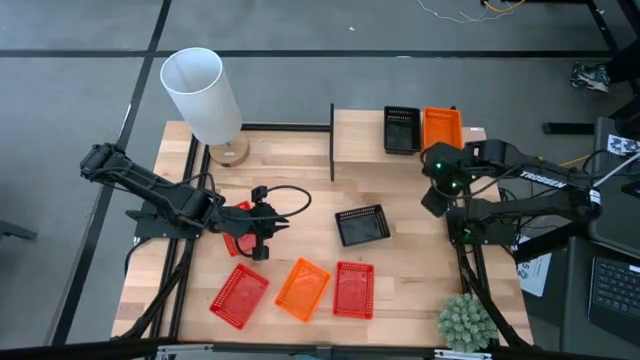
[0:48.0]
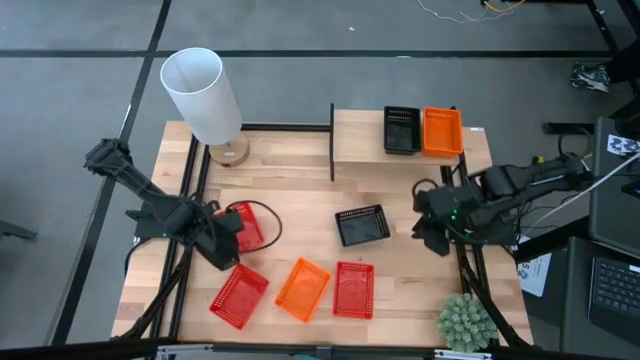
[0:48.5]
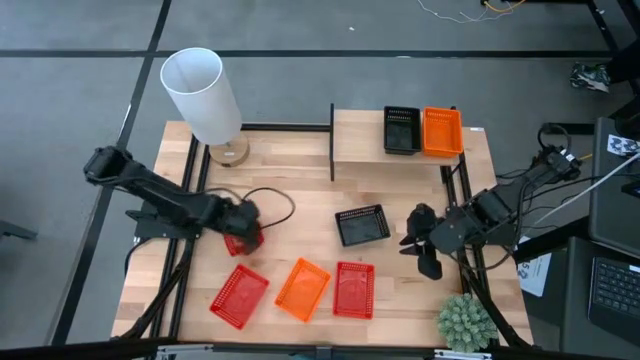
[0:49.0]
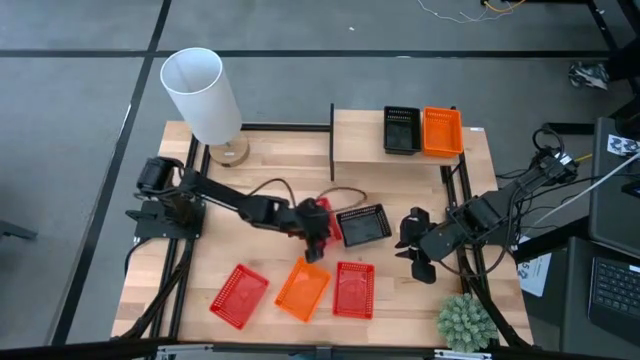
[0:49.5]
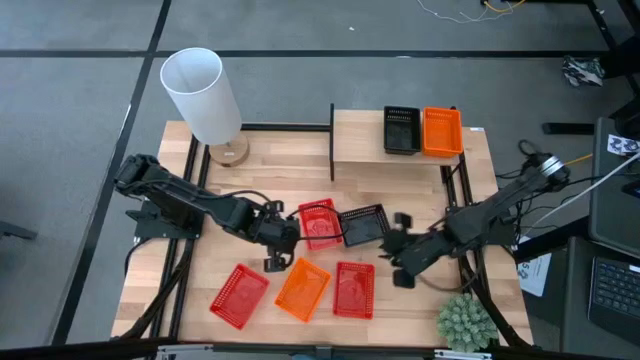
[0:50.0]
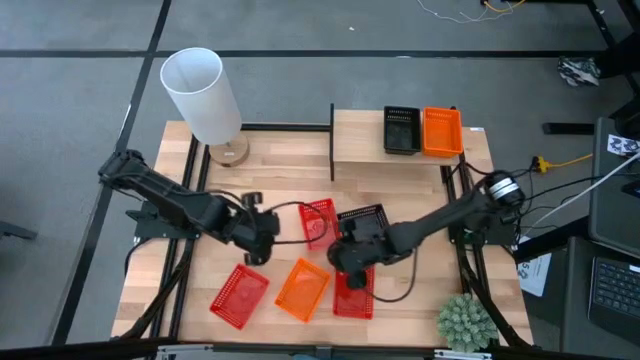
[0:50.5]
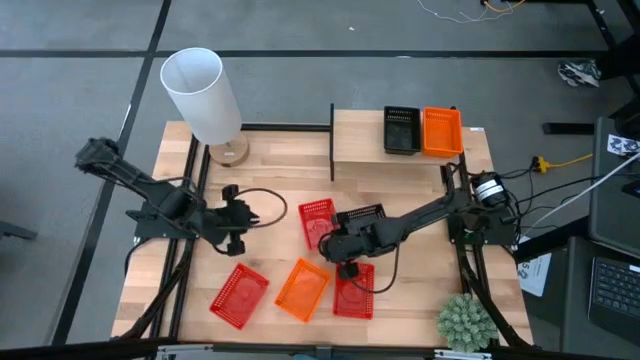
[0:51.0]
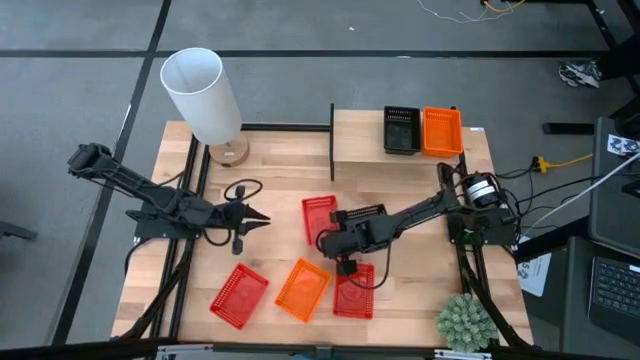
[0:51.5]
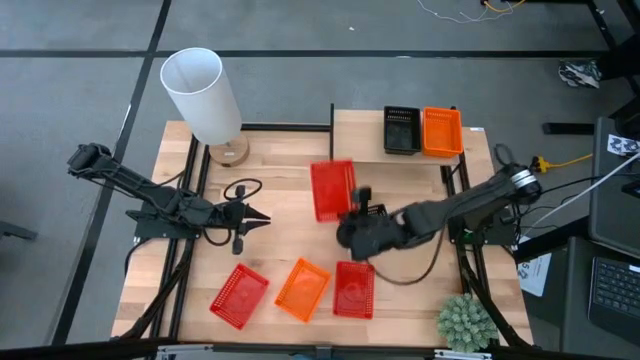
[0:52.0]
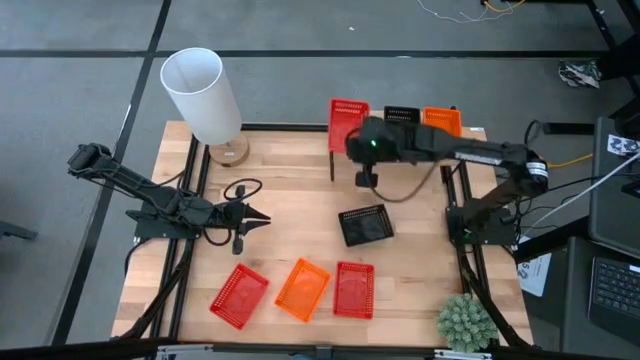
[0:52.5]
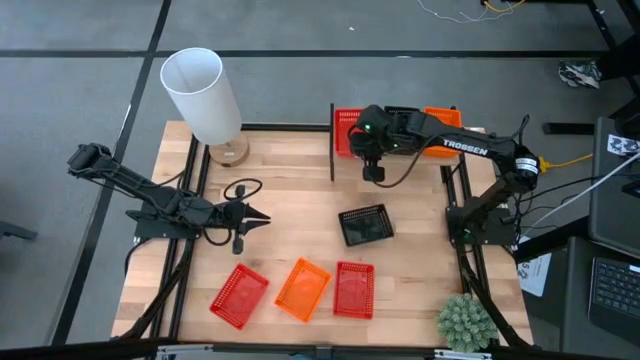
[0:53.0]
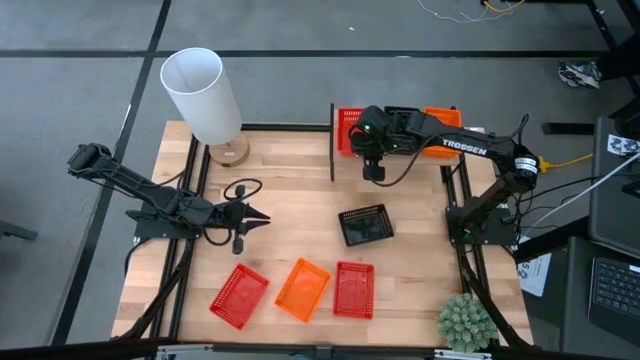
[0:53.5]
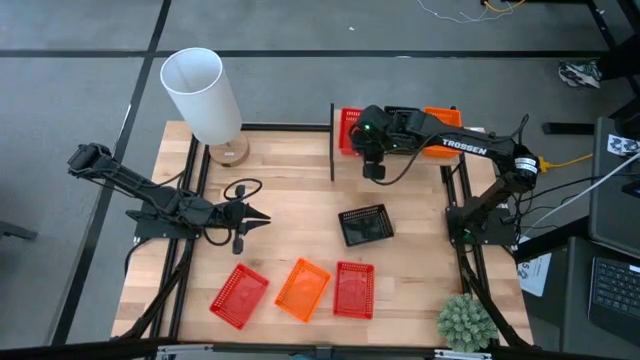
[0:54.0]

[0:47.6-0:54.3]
Task: Stack baskets on shelf by color
Put the top red basket on the shelf

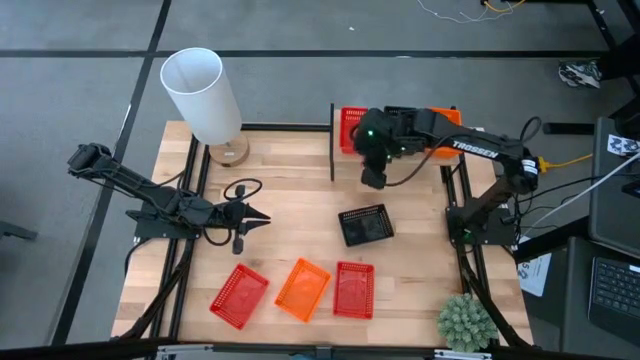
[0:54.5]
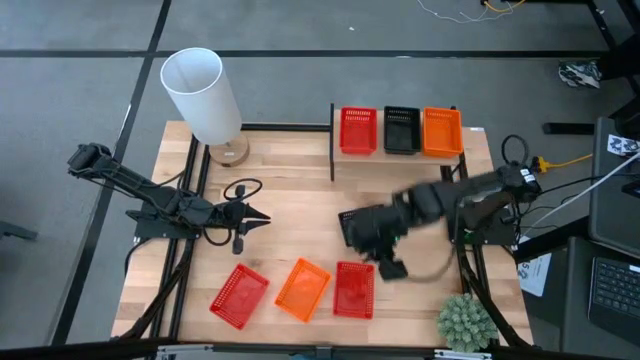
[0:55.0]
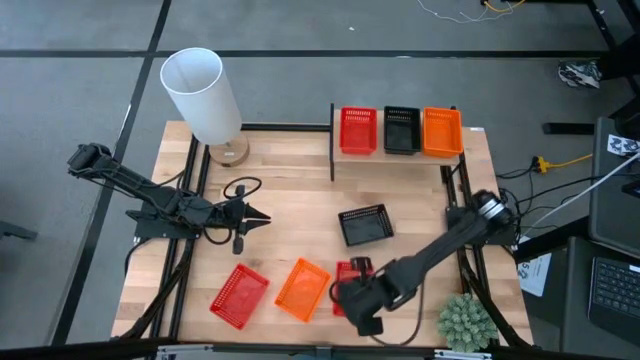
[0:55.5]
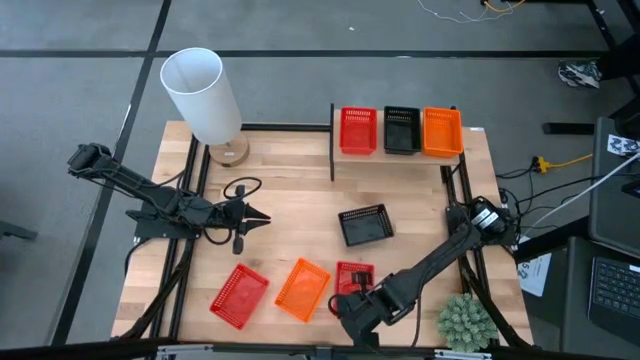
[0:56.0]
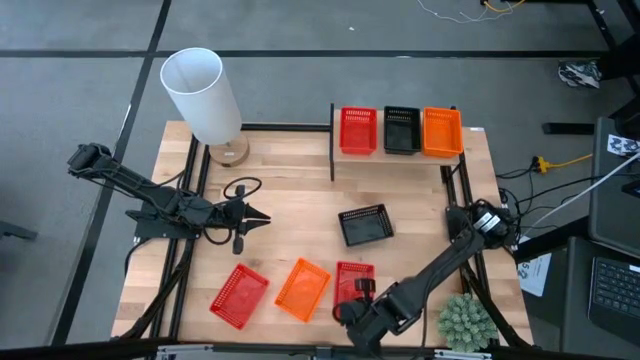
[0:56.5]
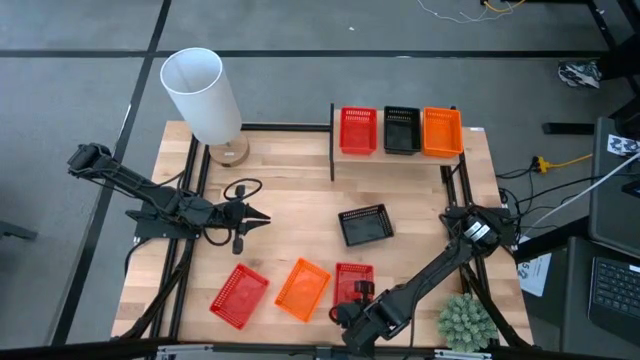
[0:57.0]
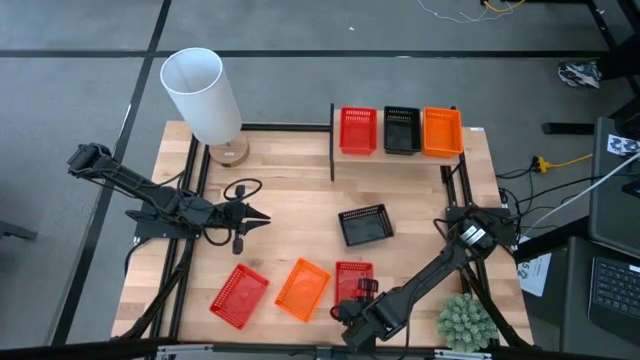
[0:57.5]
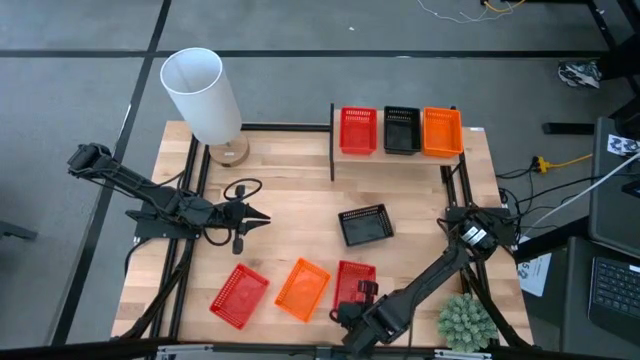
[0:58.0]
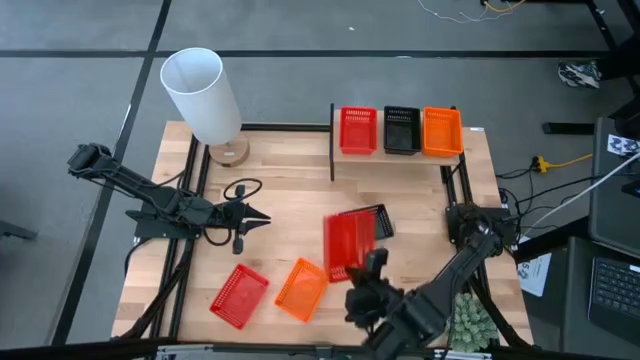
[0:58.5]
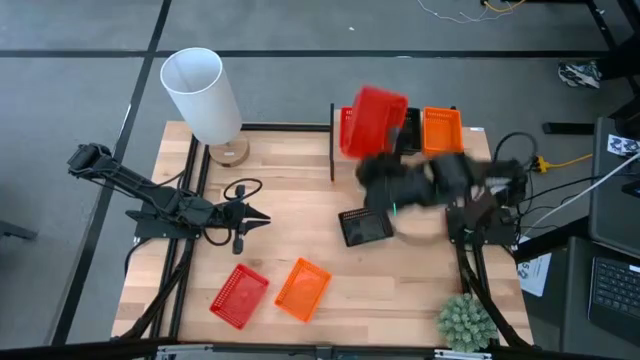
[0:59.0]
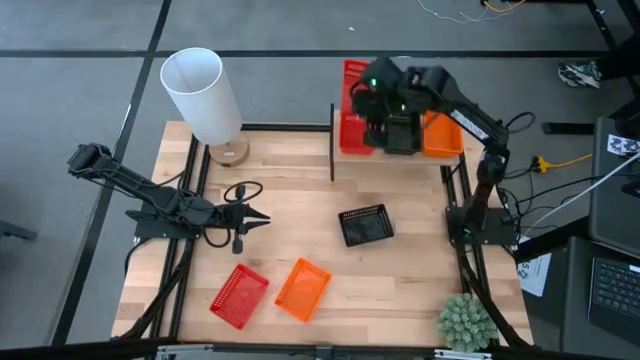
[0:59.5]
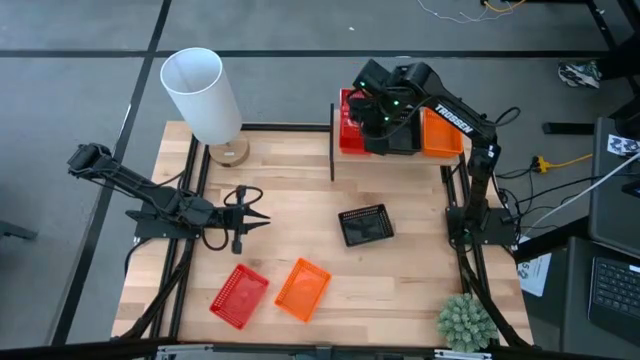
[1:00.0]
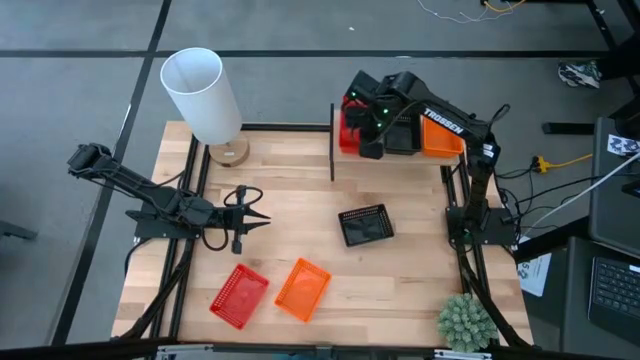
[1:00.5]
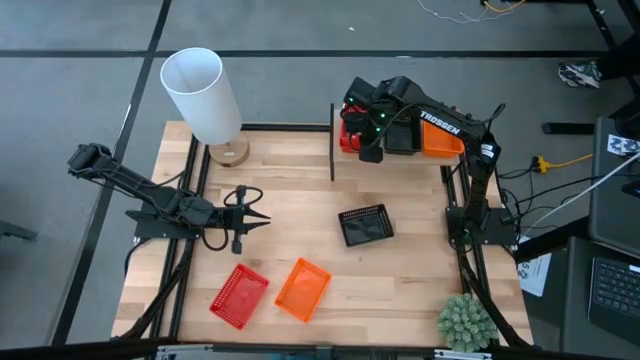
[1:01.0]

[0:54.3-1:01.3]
Stack the right red basket on top of the red basket on the shelf

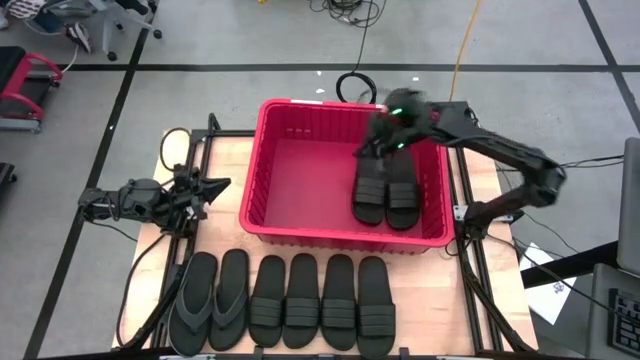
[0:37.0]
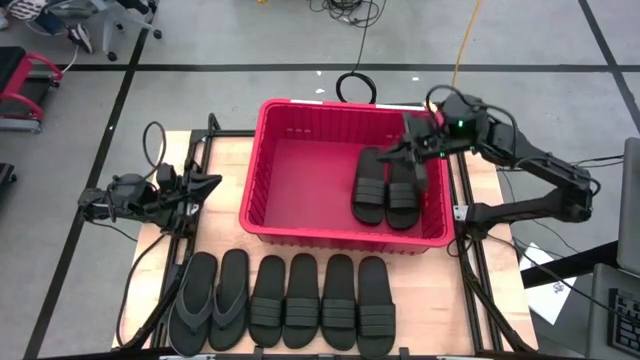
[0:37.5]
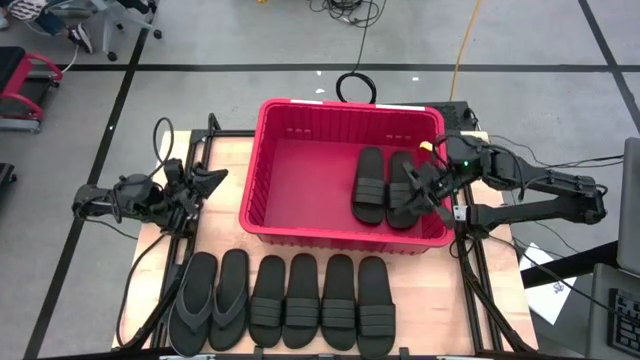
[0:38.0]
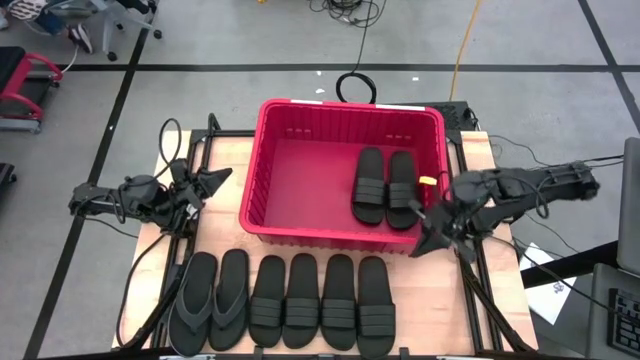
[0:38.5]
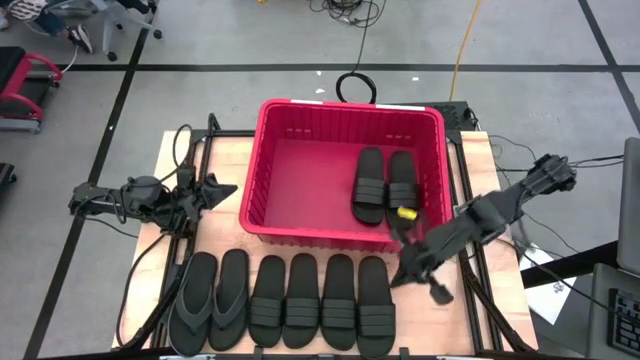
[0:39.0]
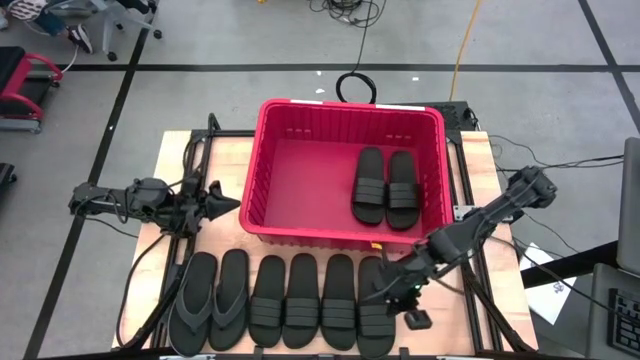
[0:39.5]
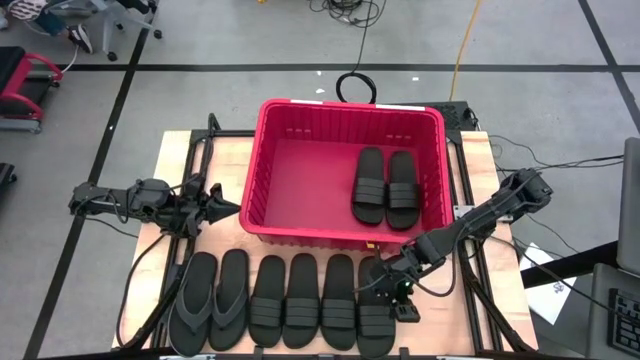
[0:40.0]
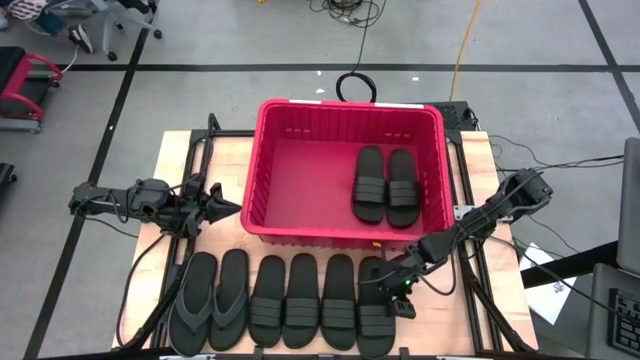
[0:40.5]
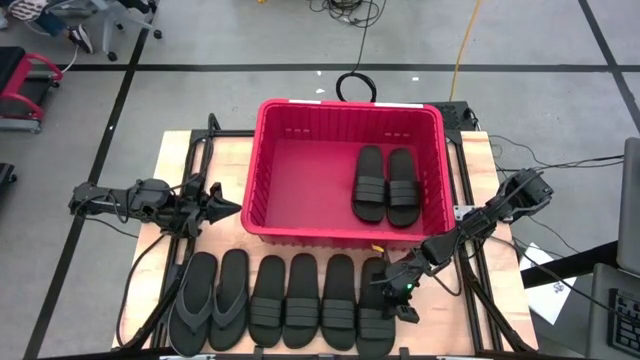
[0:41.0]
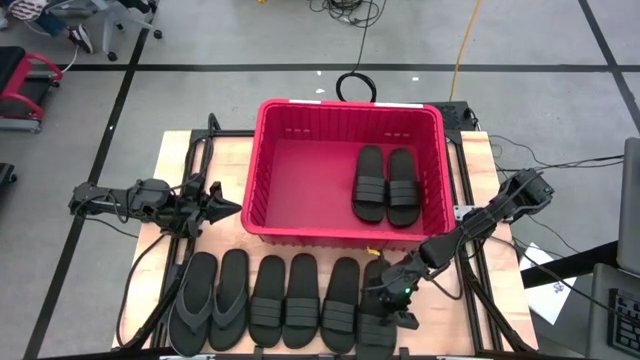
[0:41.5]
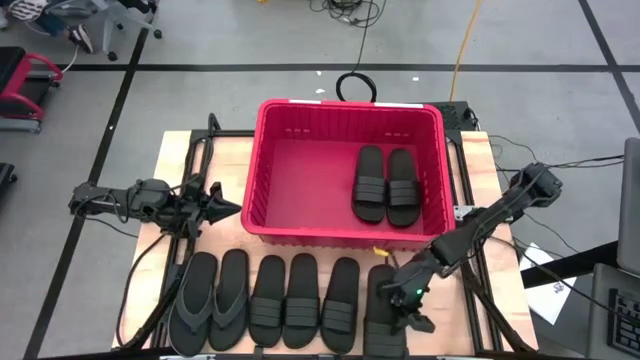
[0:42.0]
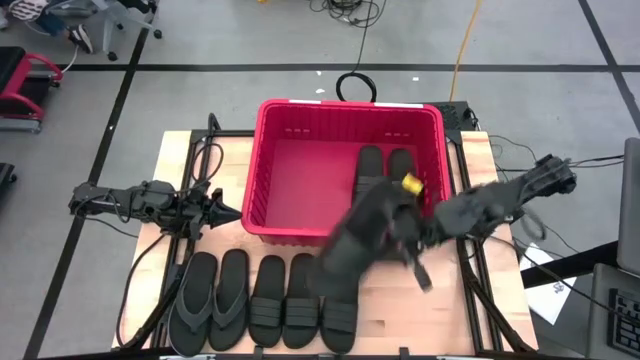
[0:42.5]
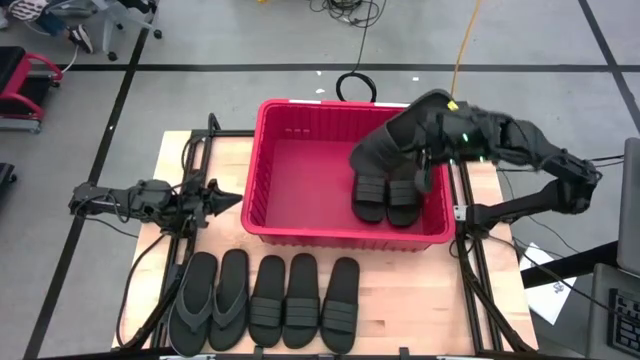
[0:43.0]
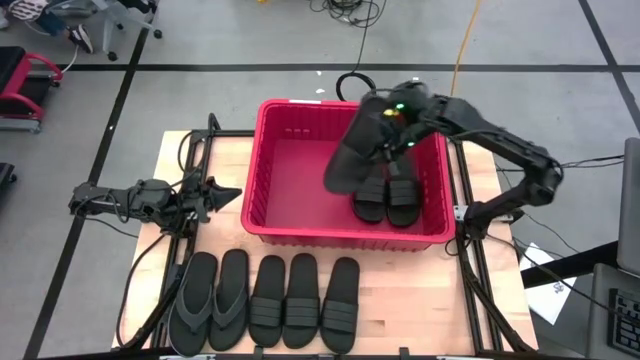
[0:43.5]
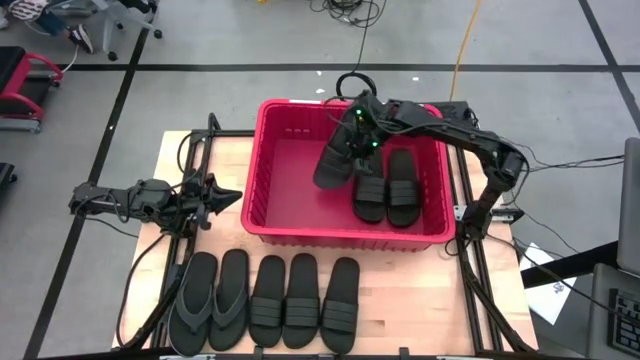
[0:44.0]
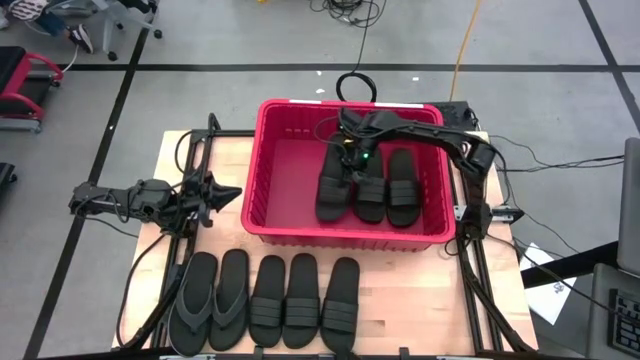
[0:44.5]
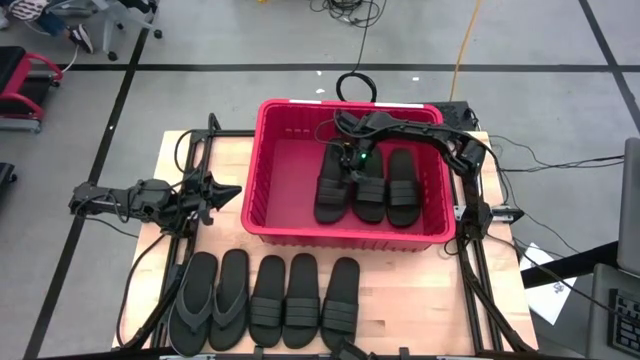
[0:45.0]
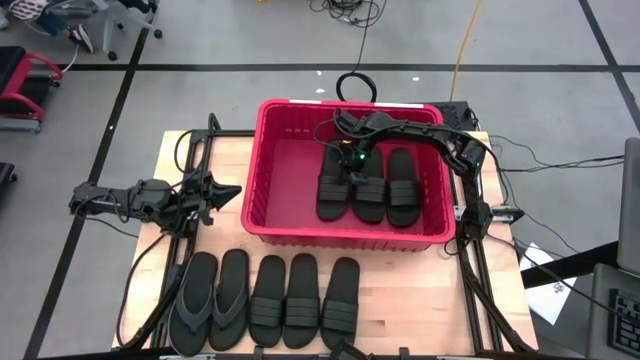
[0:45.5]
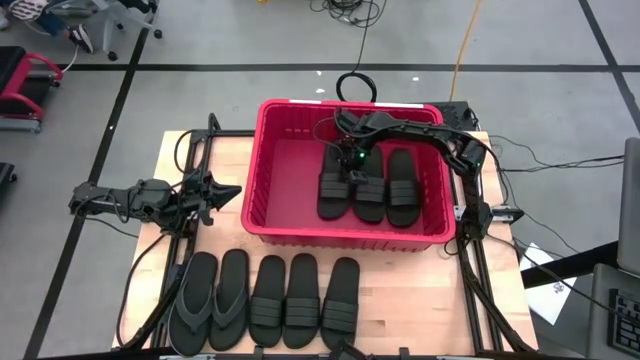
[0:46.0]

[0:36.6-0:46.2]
Task: Pick and place slides into bin
Put the black slide into the red bin
